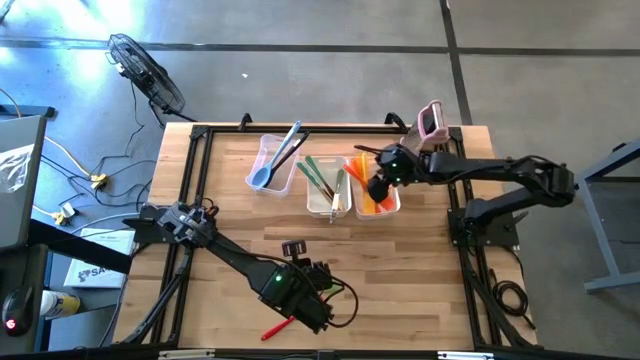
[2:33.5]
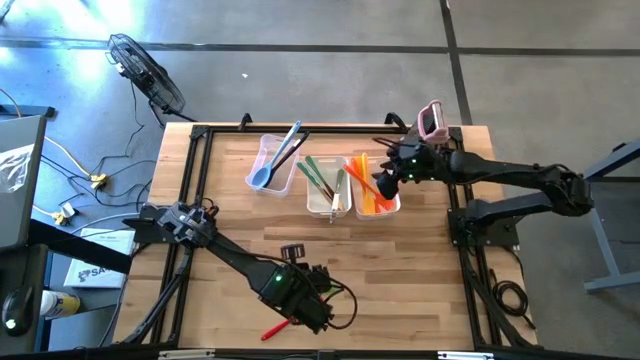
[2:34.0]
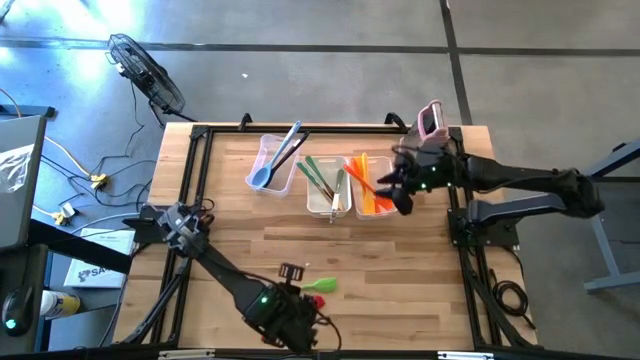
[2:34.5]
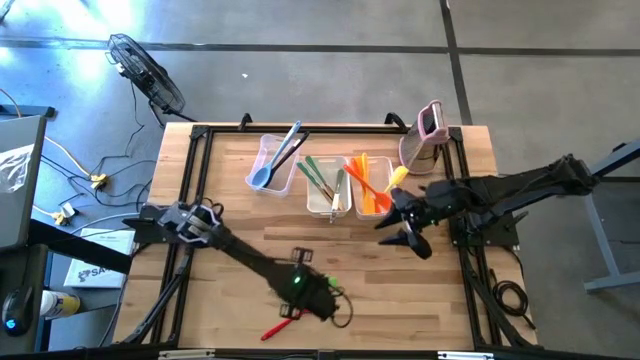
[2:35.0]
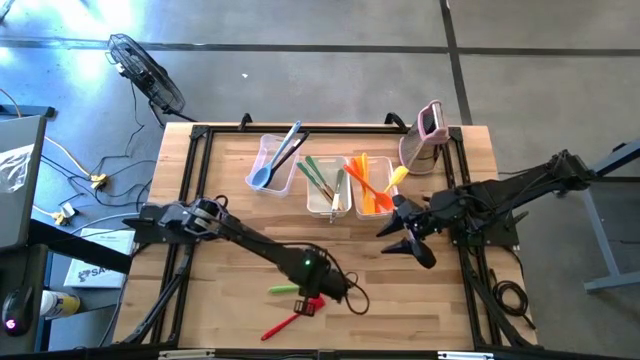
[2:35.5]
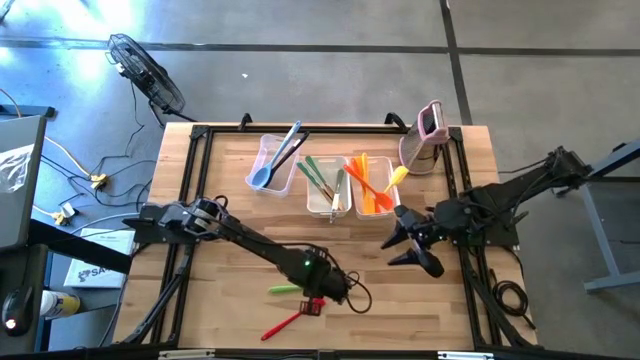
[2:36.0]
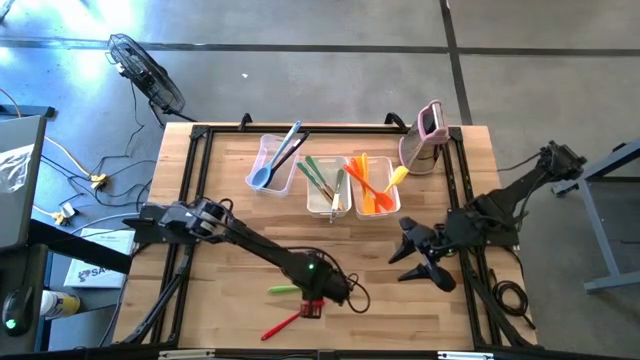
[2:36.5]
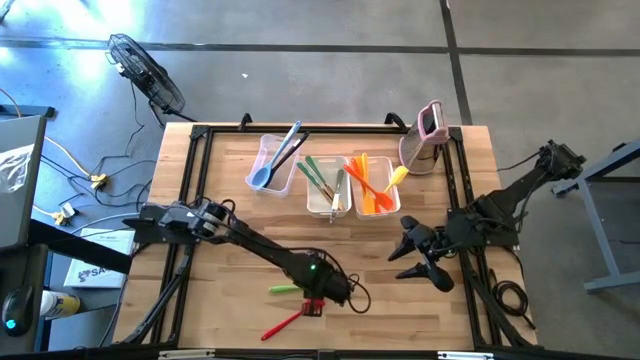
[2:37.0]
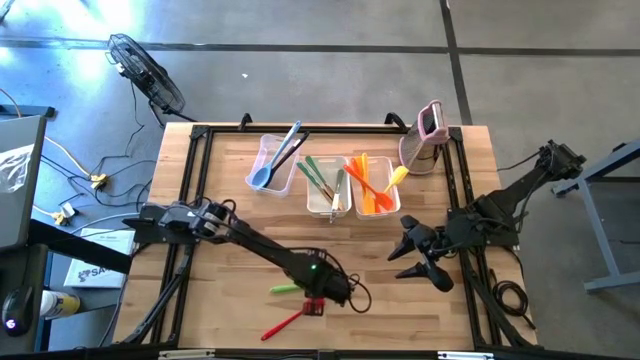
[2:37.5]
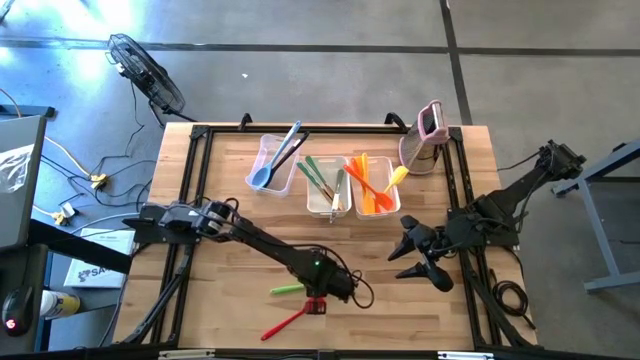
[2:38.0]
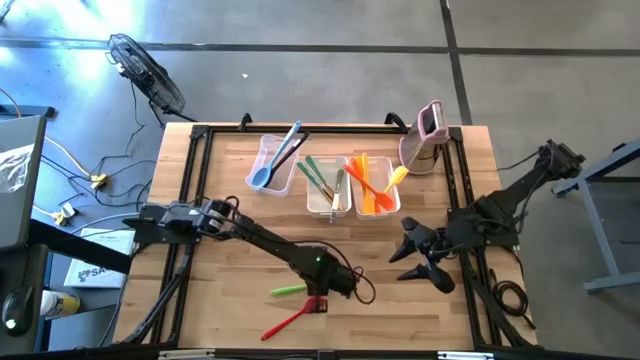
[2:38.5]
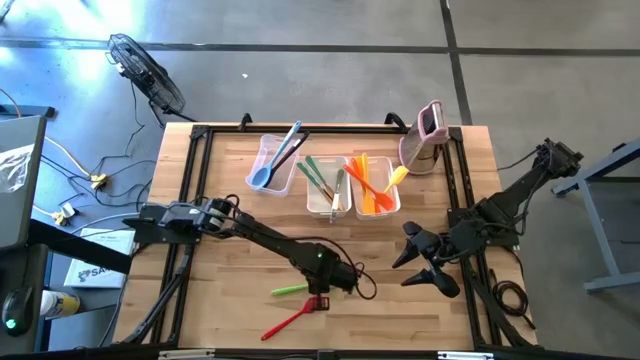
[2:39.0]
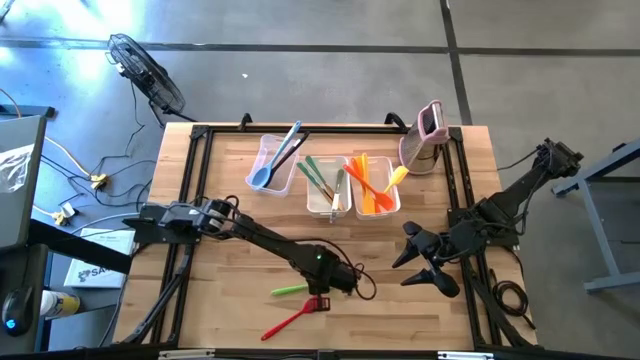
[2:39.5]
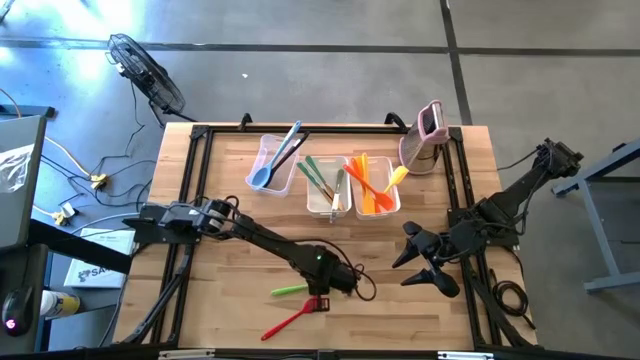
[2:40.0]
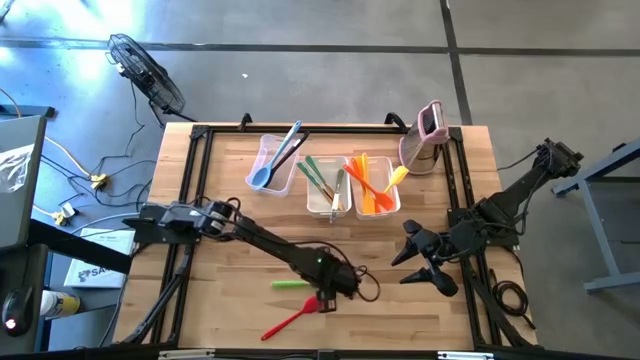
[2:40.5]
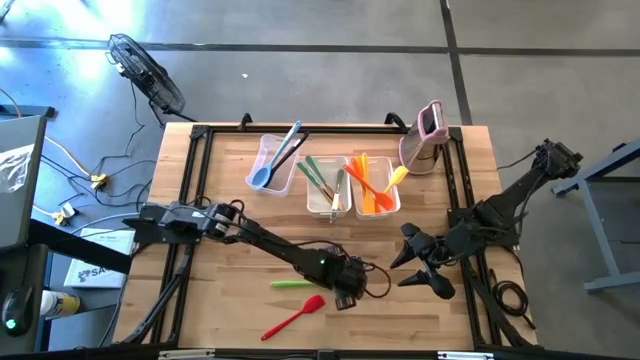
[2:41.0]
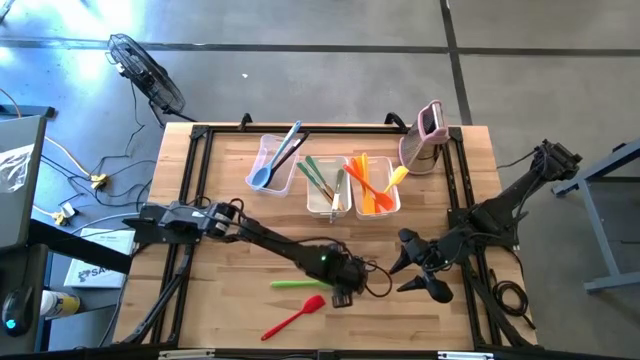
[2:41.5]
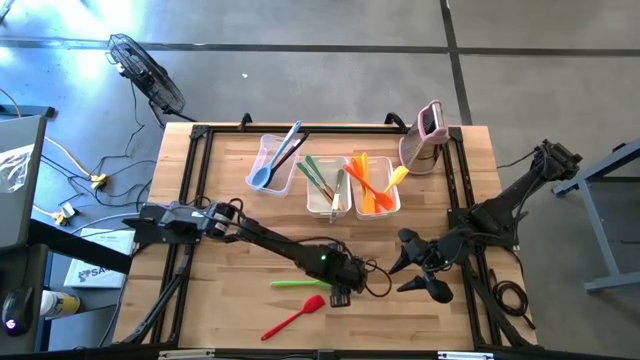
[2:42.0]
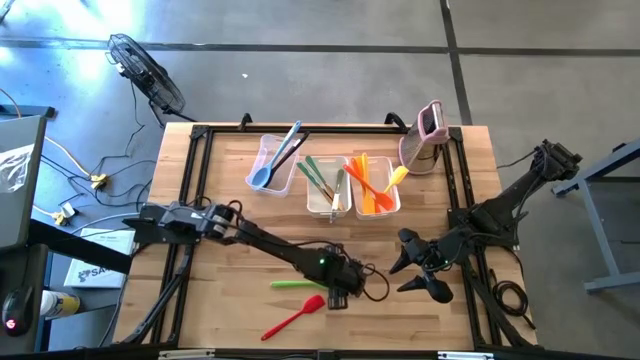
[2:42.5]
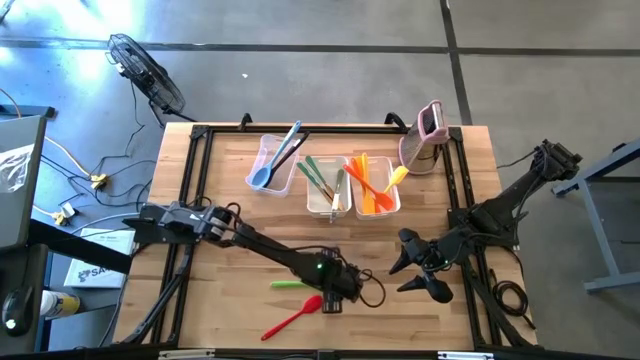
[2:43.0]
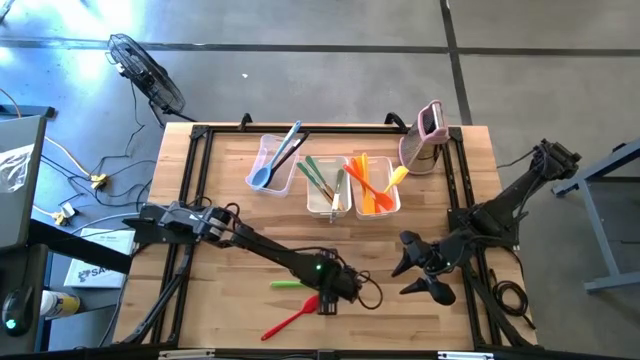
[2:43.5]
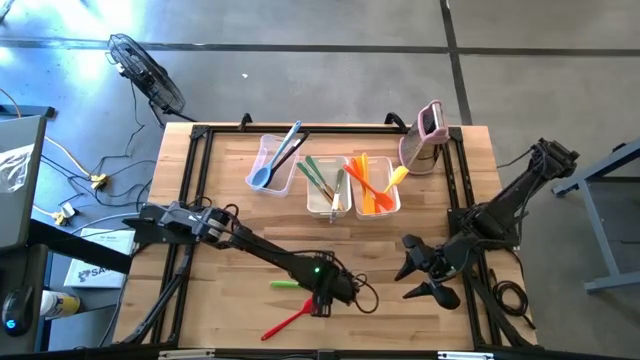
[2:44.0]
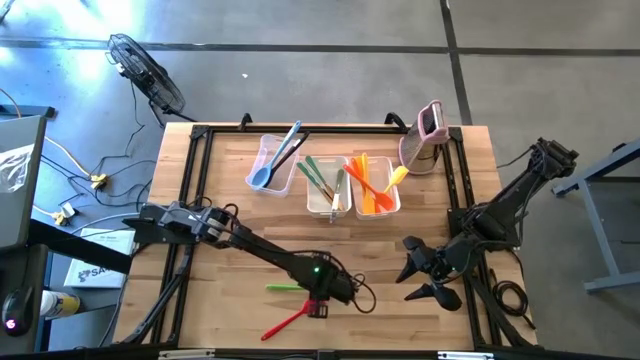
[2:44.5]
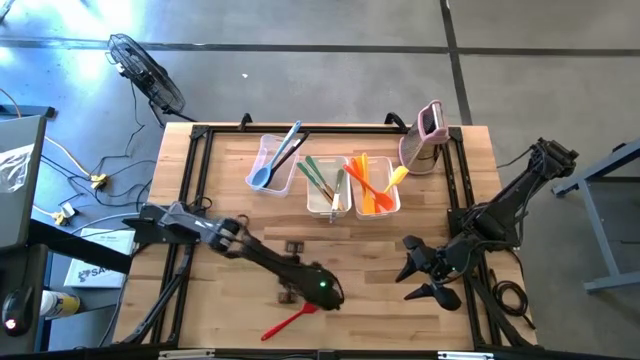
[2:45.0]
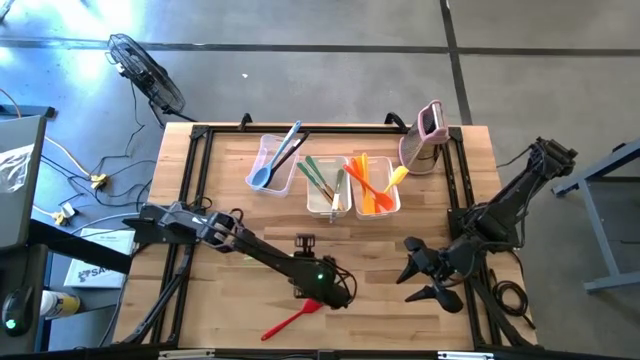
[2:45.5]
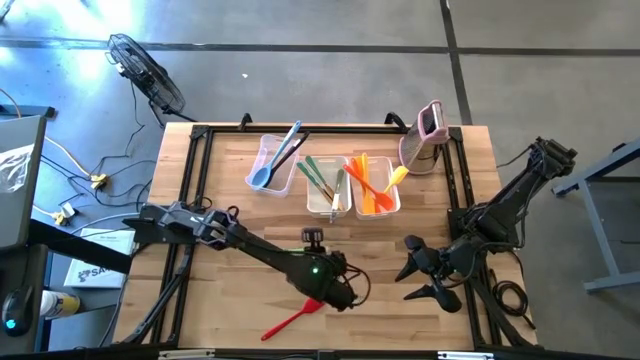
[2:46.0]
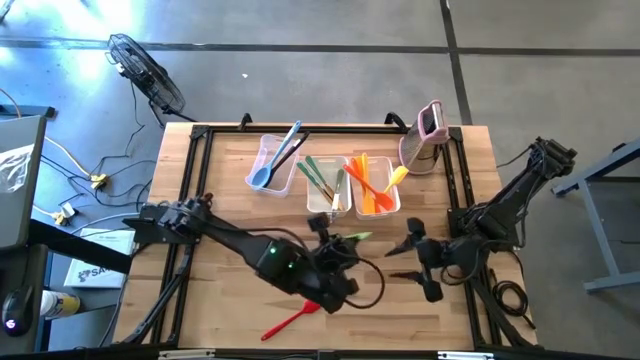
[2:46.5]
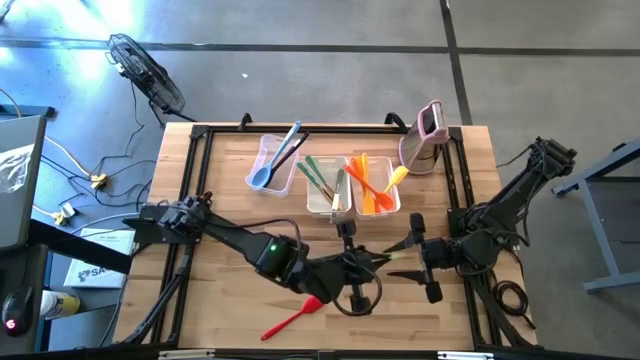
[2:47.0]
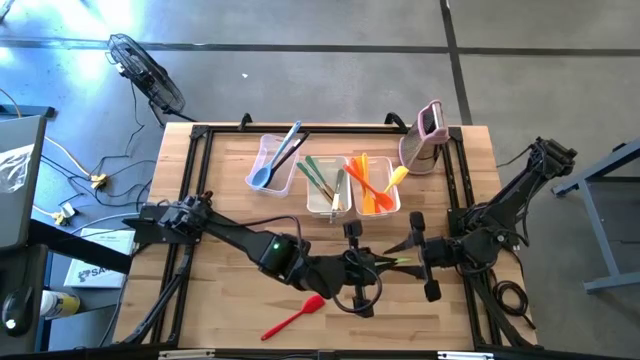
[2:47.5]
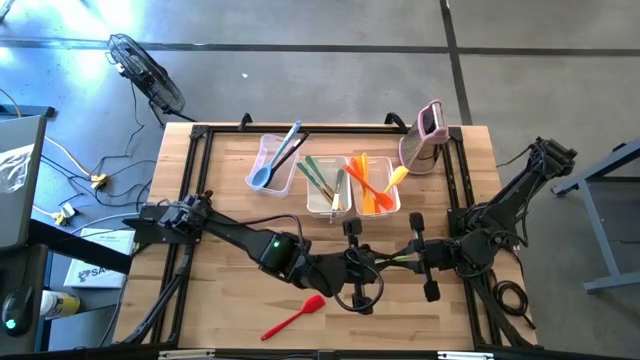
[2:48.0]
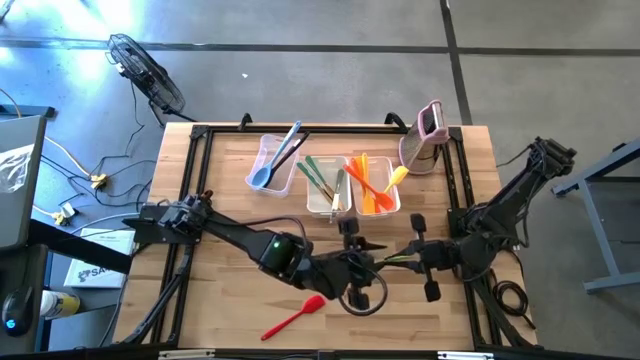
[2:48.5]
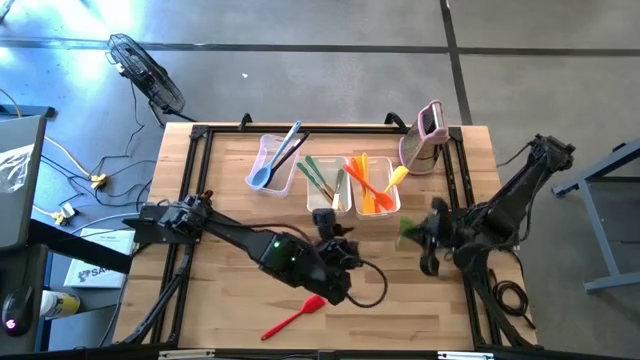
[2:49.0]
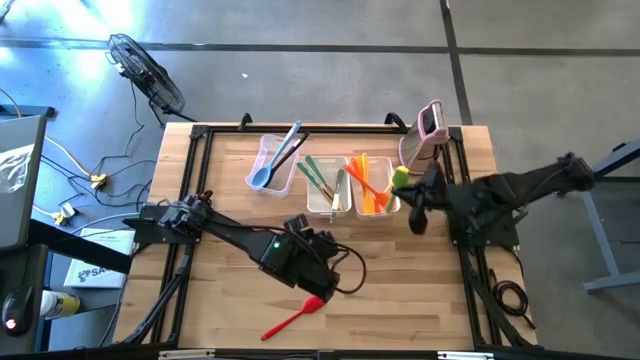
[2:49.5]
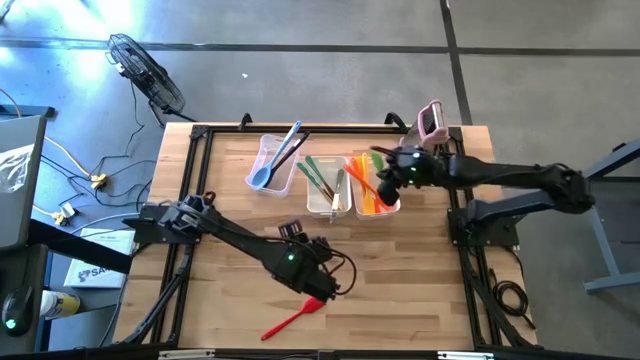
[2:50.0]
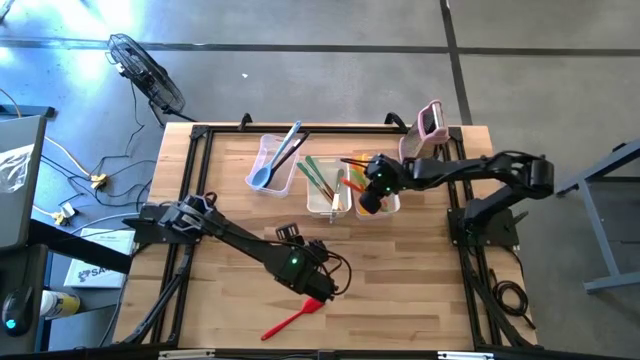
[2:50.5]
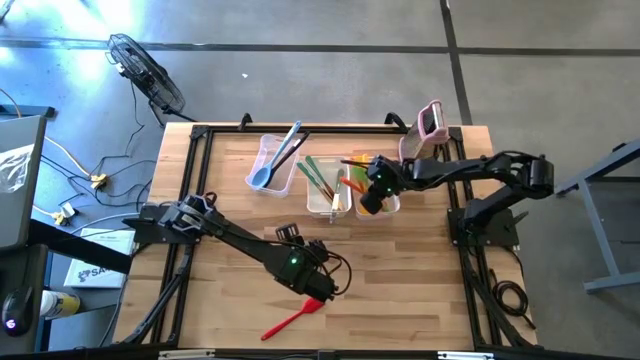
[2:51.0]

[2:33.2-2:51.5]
Task: Pick & Place Kitchen Items
Put the green spatula into the right white bin

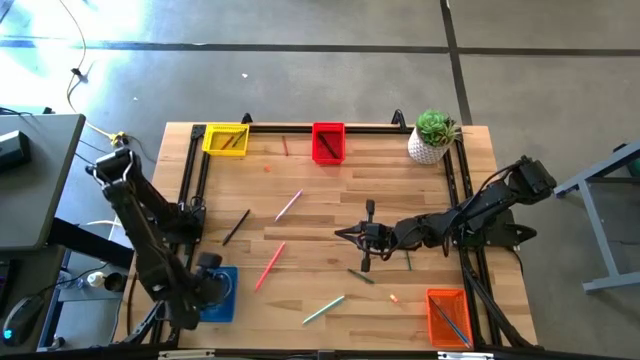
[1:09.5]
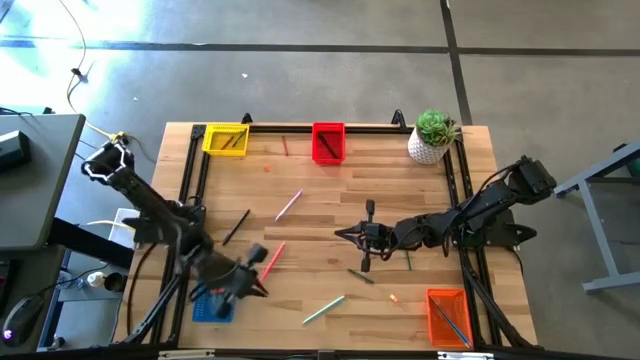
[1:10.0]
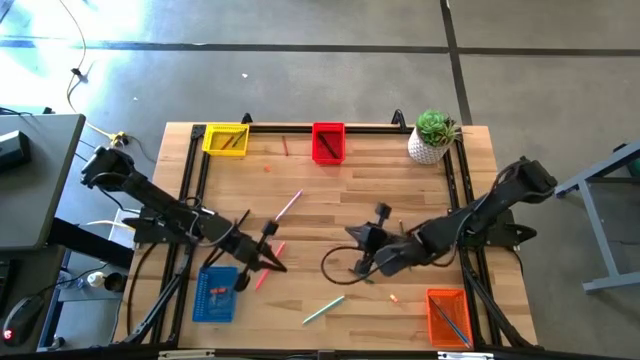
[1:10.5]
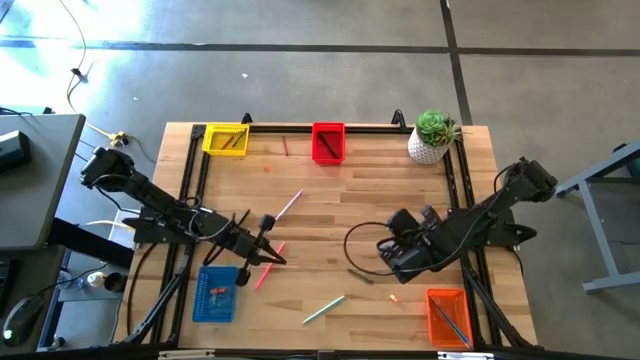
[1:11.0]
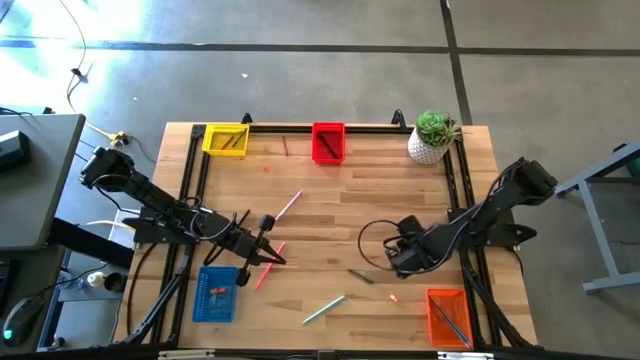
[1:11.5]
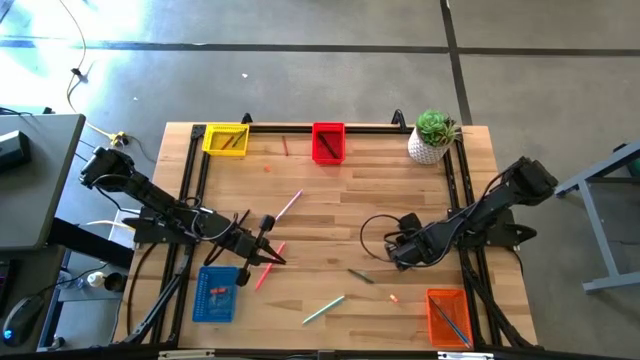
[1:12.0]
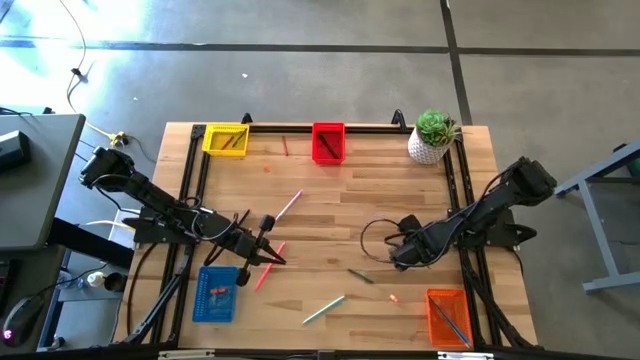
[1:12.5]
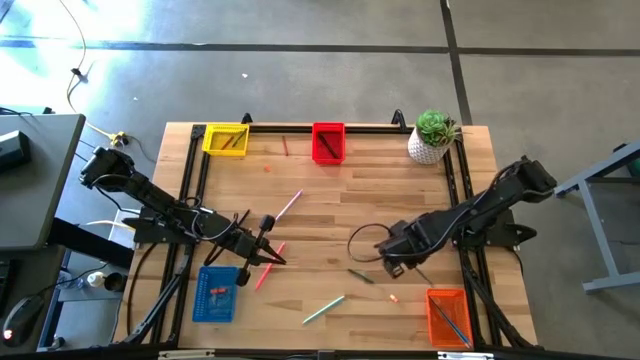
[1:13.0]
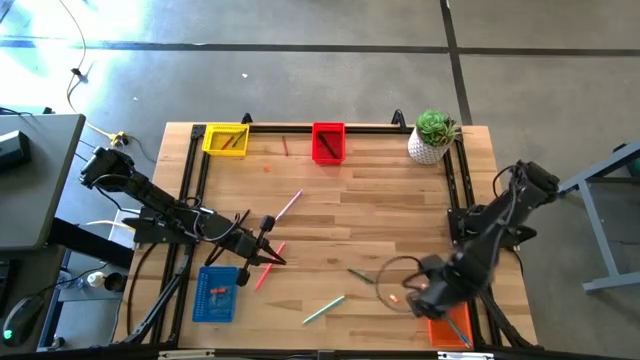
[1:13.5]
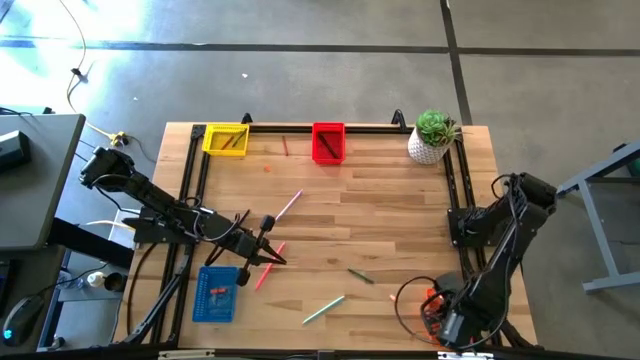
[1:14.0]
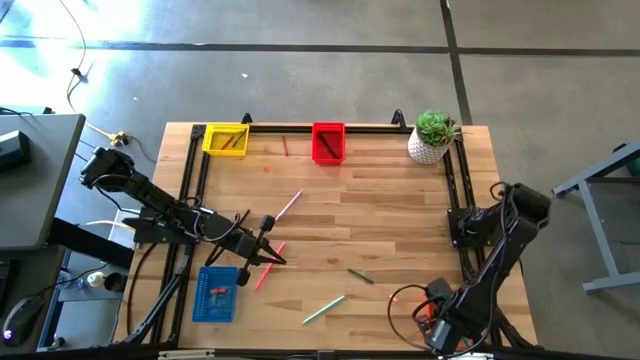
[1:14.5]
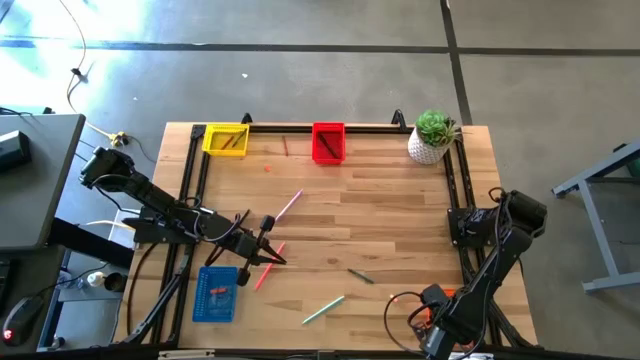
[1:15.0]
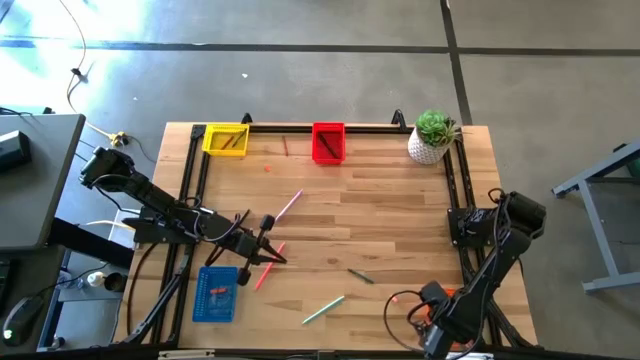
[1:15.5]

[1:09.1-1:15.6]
Task: Sort crayons/erasers/pens/pencils in bins
Put the green pencil into the orange bin
